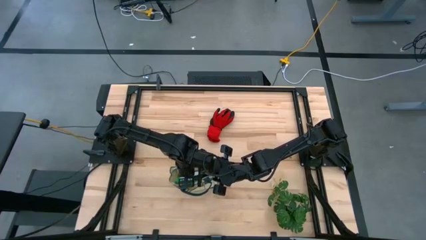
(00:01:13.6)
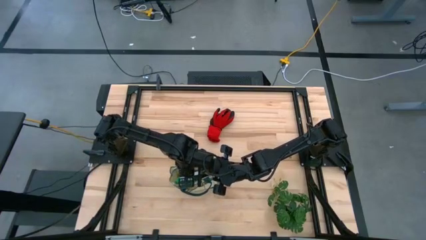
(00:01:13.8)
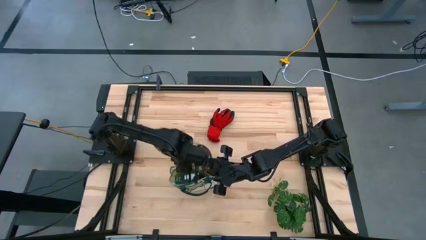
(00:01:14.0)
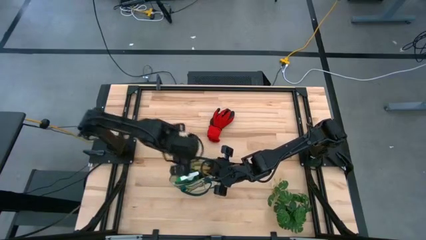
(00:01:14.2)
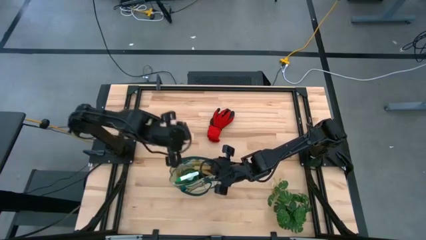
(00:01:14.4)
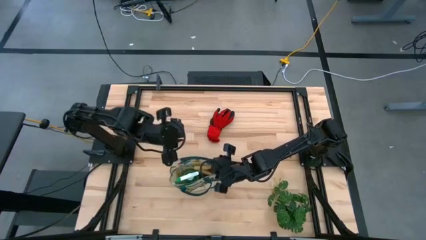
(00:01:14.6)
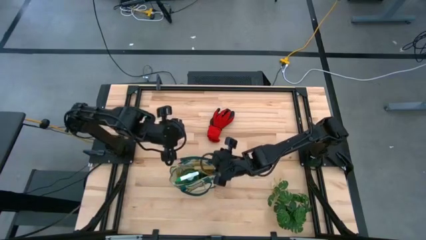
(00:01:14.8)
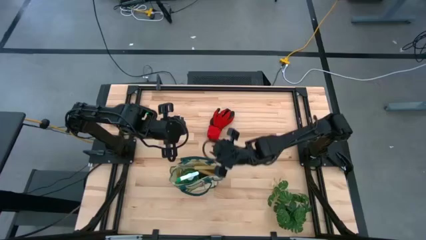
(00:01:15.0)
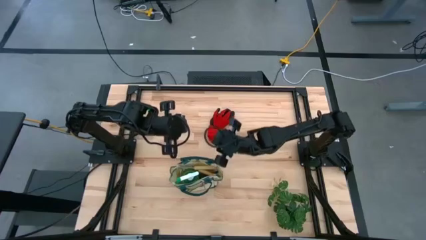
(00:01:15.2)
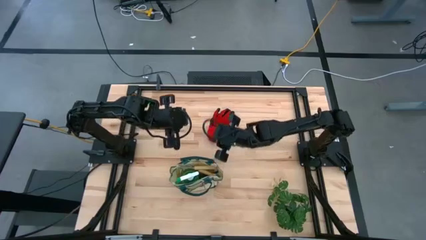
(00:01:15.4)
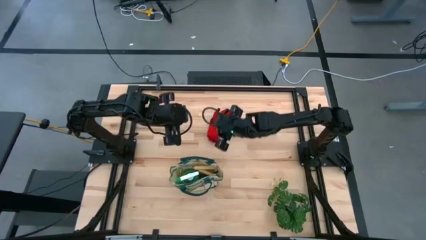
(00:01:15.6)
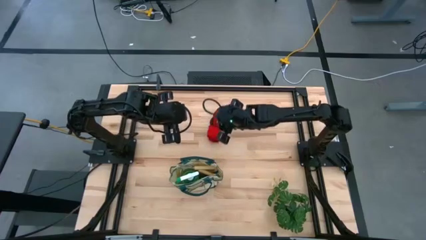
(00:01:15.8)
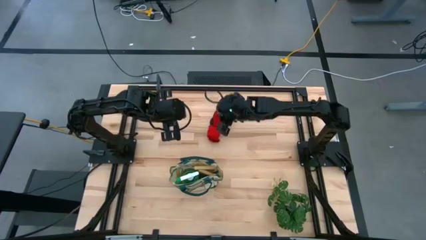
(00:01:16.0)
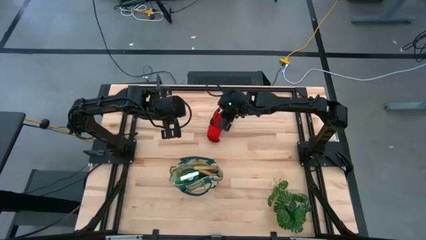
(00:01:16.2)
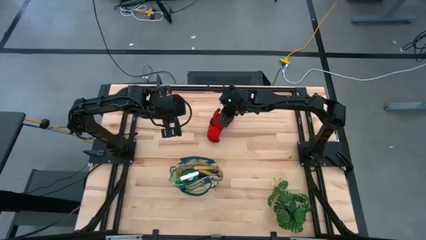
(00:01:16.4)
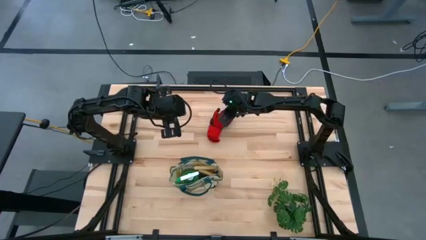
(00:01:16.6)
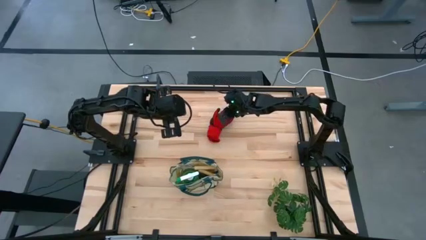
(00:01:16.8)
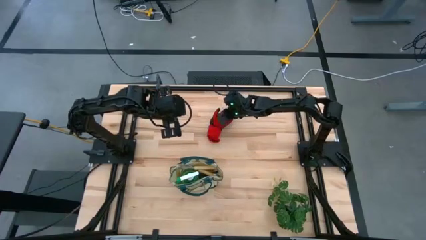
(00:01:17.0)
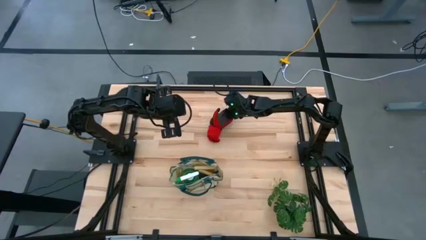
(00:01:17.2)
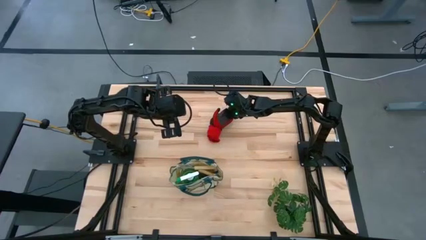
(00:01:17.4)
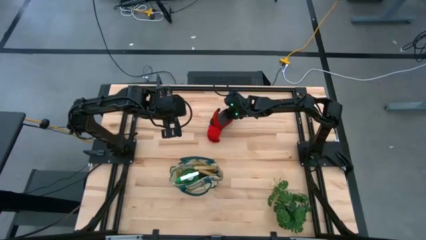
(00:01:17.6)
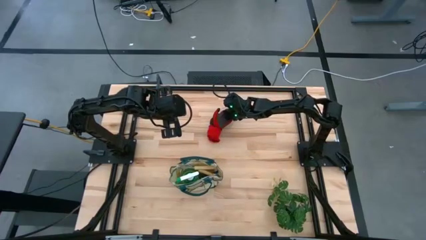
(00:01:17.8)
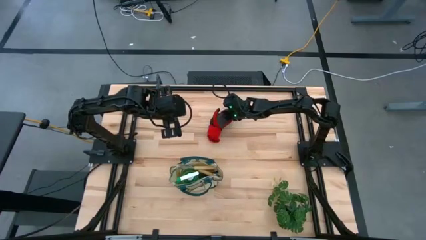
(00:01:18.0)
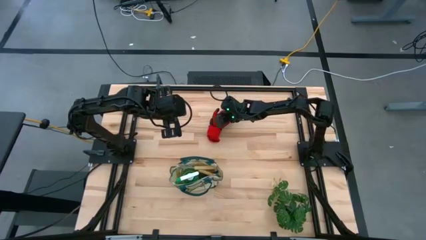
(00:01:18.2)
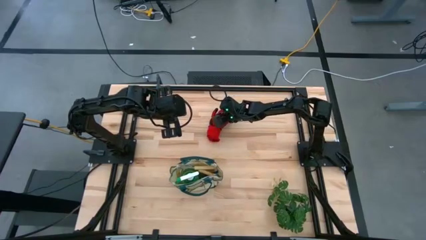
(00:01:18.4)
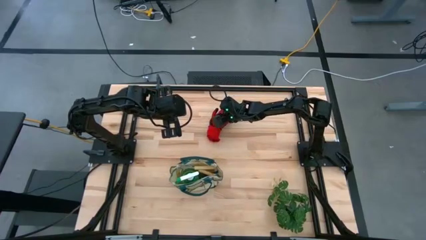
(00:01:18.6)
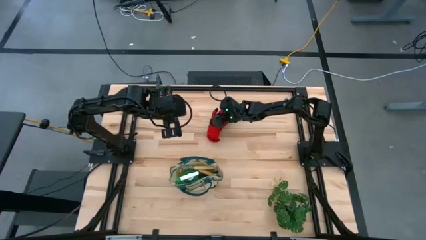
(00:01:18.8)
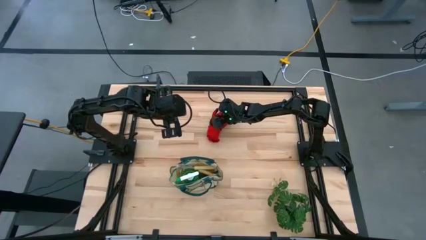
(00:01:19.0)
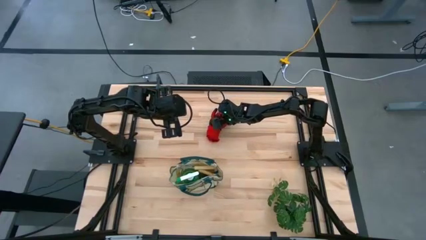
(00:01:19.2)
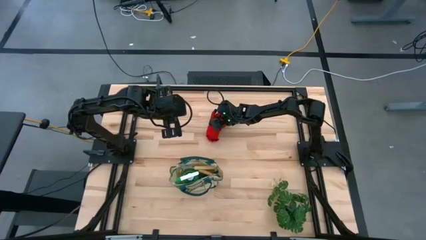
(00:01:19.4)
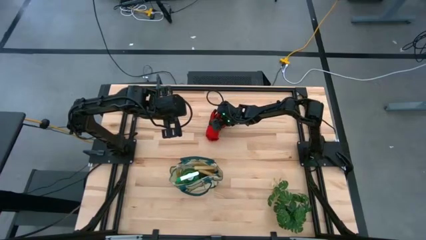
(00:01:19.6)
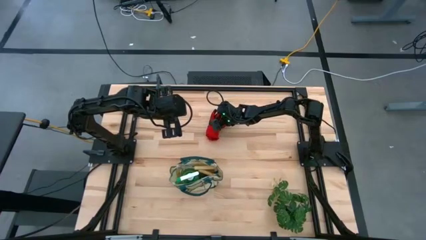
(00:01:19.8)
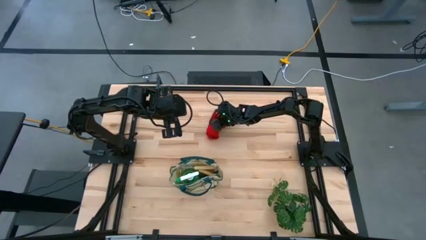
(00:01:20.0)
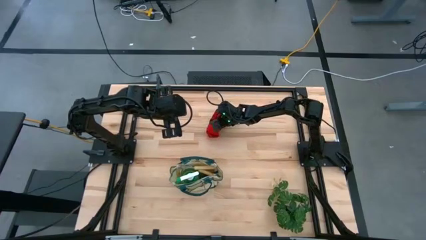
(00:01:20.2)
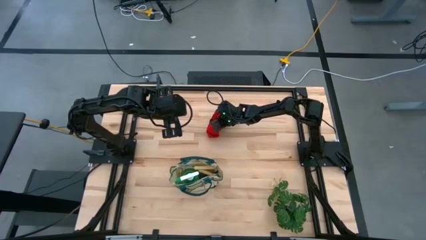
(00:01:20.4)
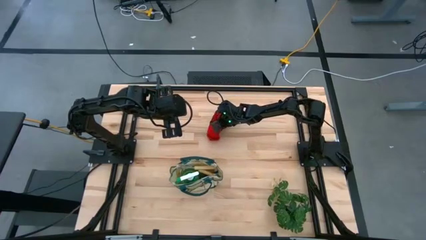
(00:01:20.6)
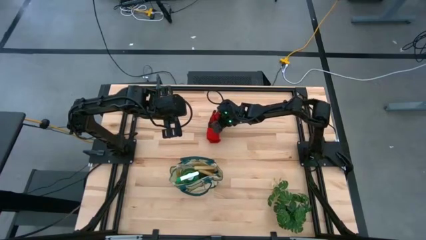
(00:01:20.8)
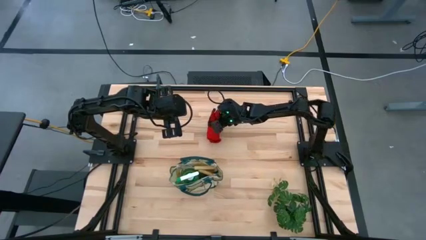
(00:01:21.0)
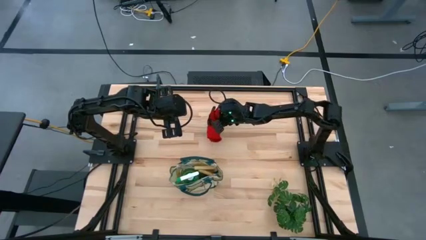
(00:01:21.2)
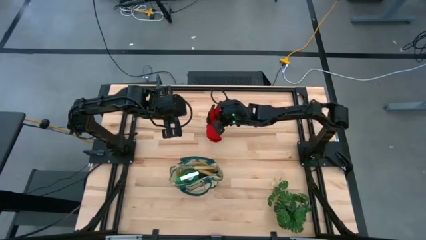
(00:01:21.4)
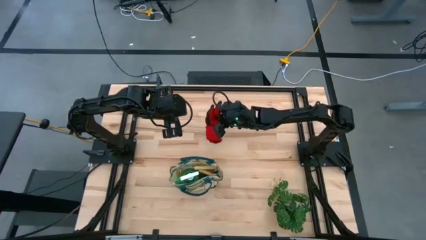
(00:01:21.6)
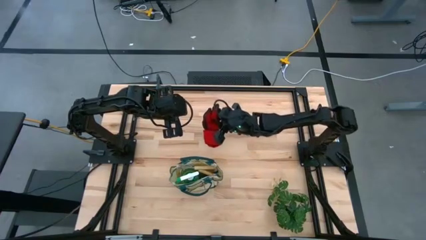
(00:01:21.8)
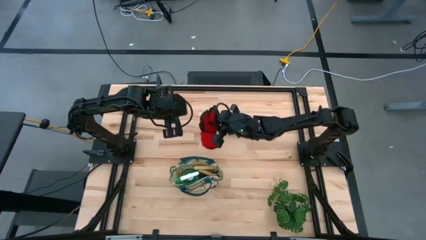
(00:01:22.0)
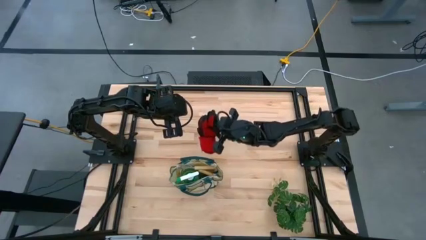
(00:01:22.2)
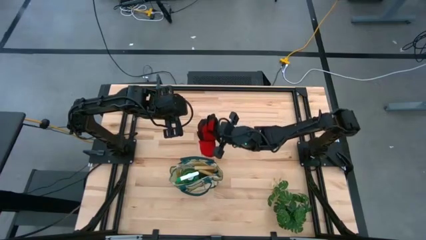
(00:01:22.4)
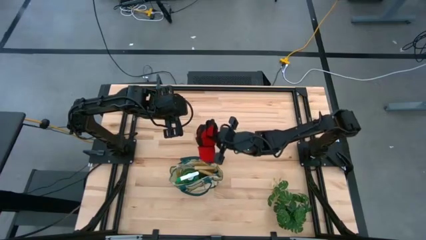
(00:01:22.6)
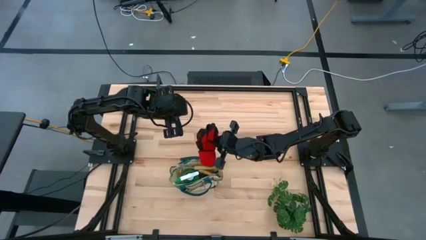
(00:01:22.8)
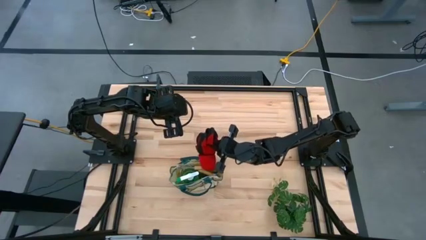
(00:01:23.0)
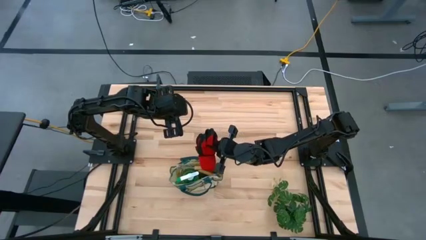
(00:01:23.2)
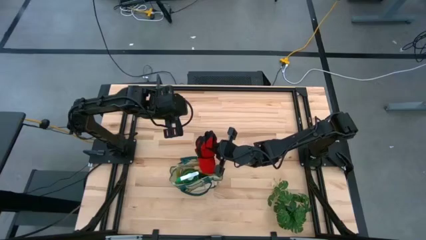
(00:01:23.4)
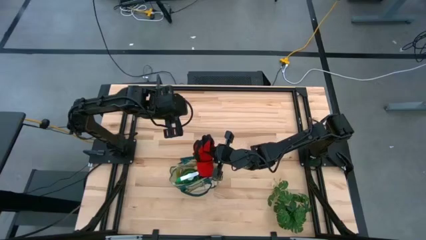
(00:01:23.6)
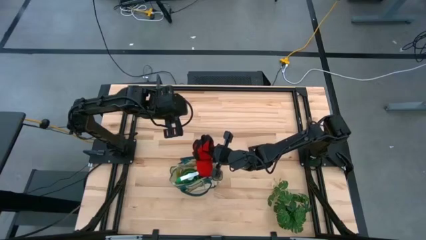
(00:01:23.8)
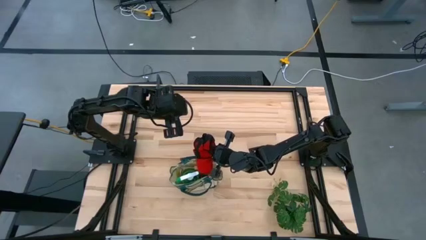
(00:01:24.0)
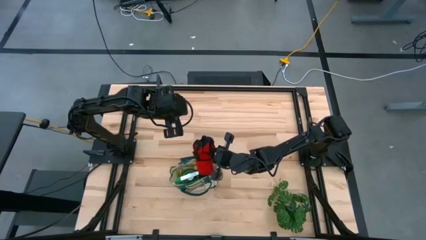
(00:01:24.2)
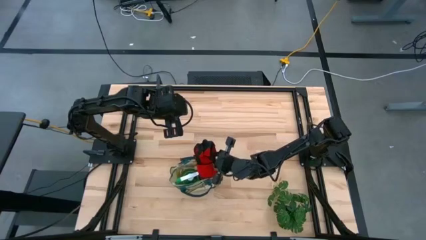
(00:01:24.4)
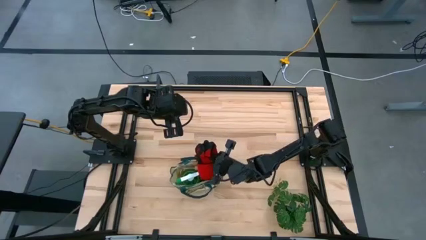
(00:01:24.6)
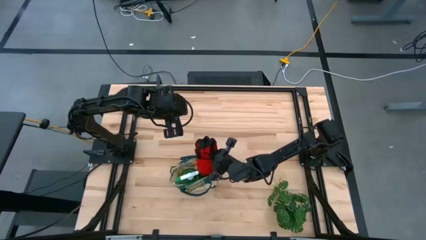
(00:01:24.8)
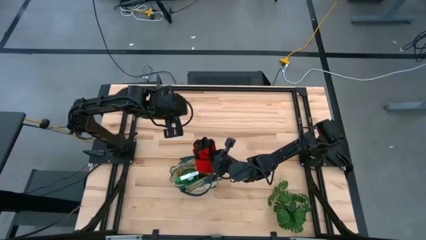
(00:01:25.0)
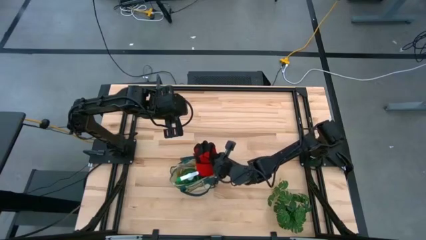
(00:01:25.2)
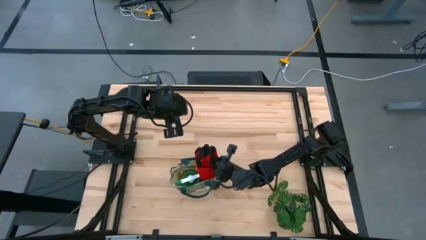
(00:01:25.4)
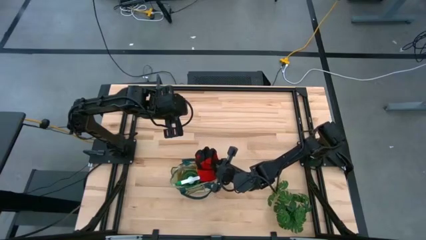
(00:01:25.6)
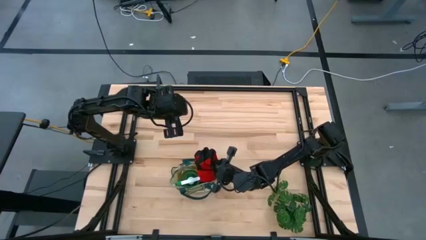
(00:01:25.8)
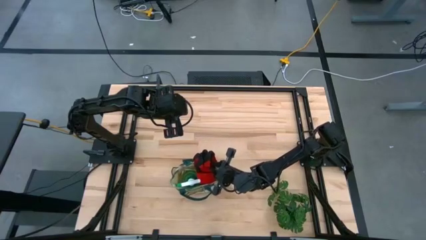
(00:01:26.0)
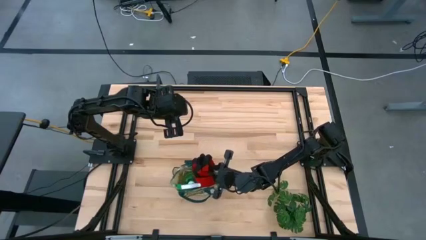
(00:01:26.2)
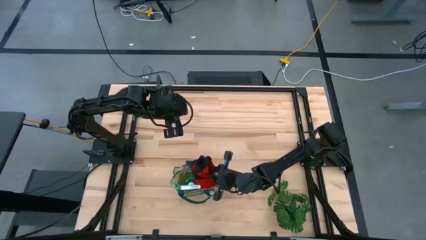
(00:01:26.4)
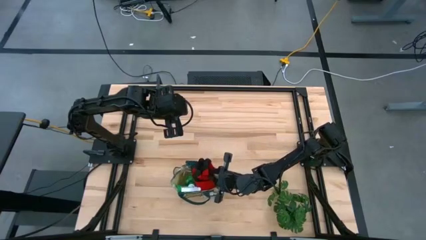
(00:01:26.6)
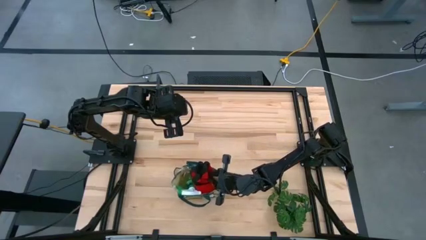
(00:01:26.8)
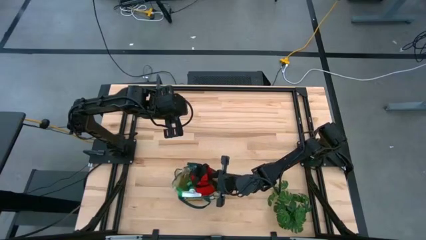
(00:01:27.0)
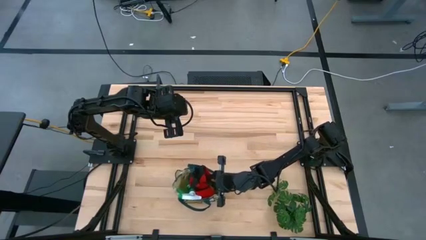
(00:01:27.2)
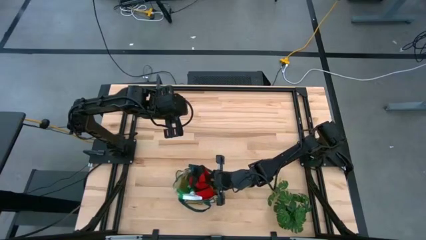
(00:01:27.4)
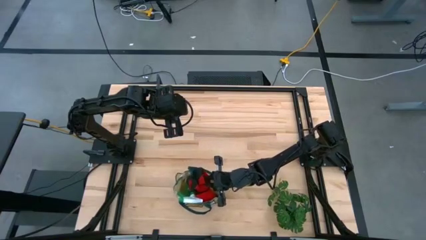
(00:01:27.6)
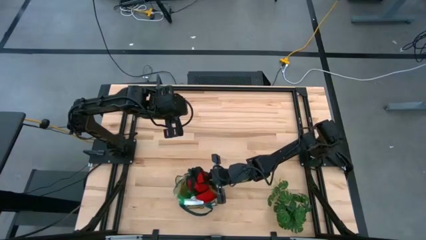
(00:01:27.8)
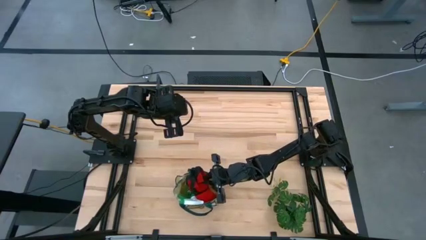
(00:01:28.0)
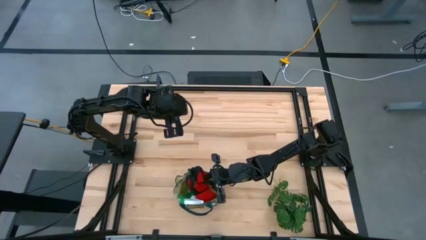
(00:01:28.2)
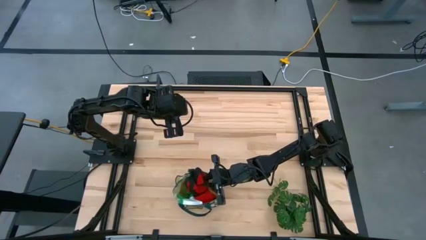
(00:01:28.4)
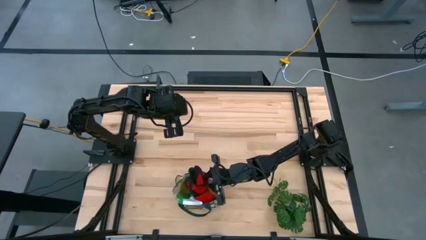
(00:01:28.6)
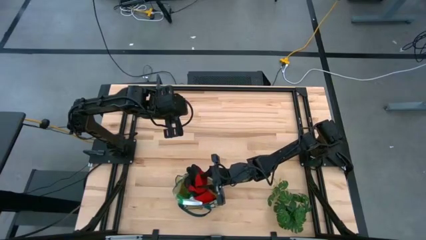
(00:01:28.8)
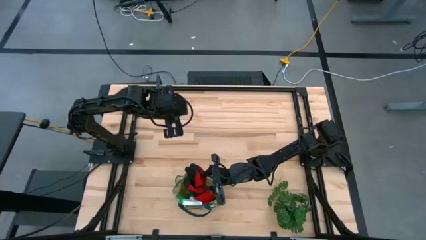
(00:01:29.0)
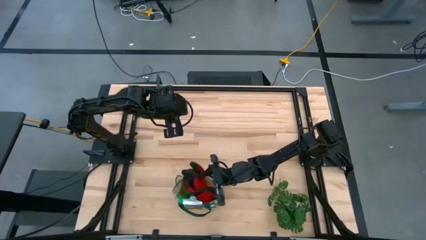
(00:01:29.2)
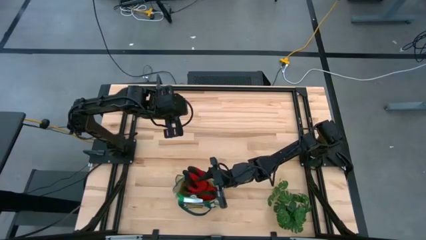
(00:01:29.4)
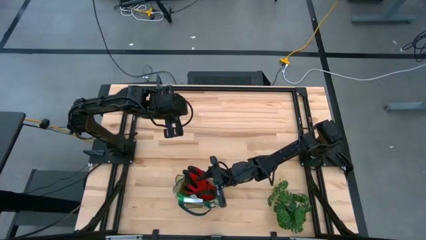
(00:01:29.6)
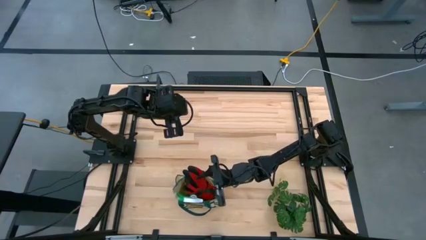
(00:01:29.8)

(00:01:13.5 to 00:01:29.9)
Task: Pick & Place Garden tools in Gardening bag
Put the gloves into the gardening bag
